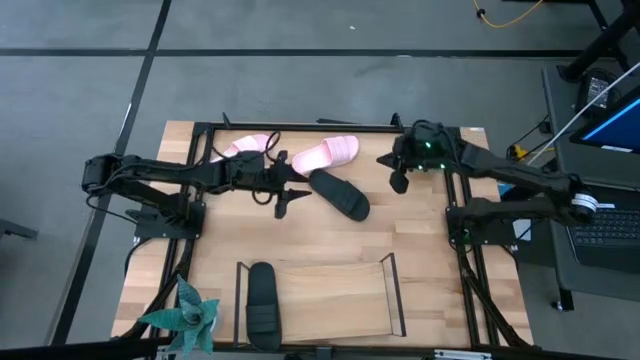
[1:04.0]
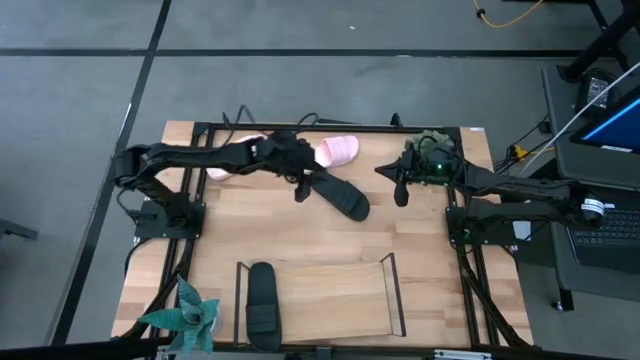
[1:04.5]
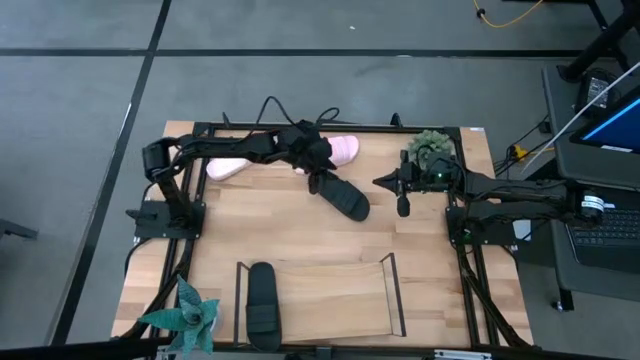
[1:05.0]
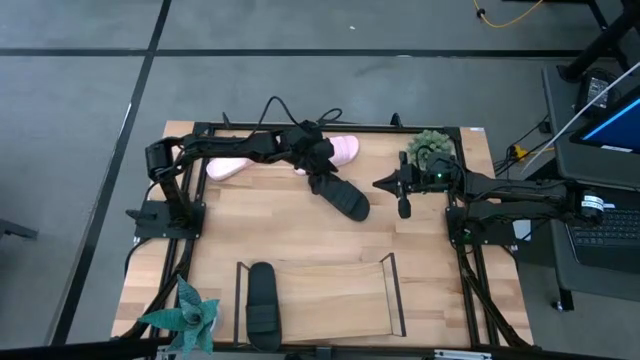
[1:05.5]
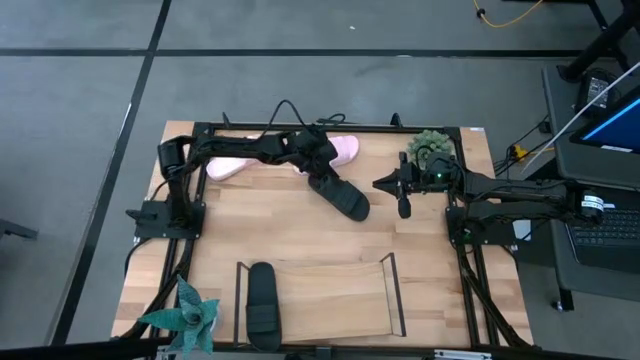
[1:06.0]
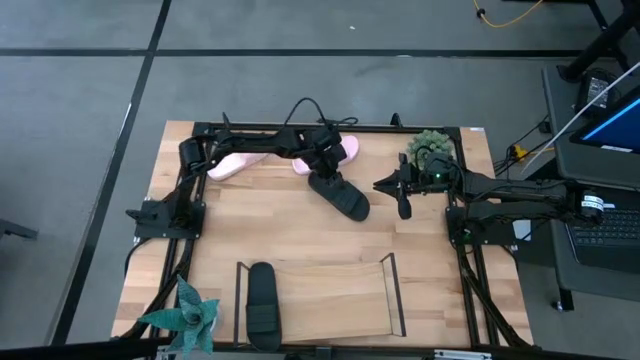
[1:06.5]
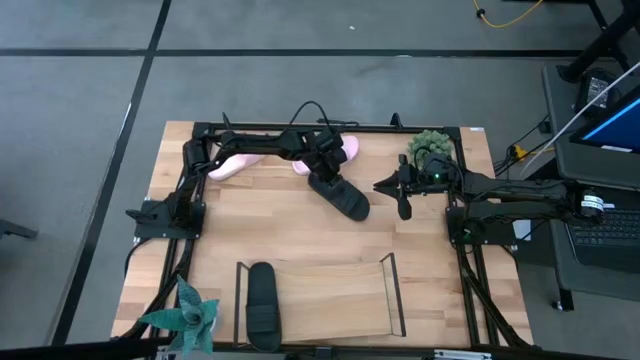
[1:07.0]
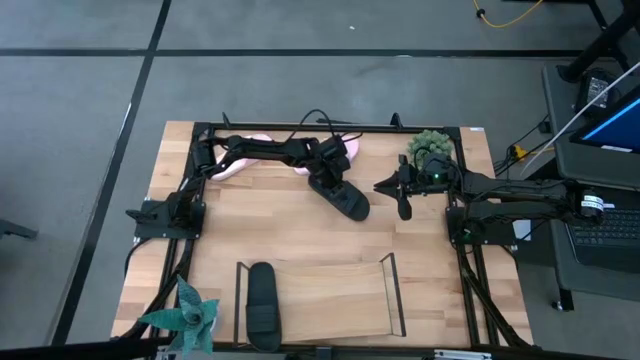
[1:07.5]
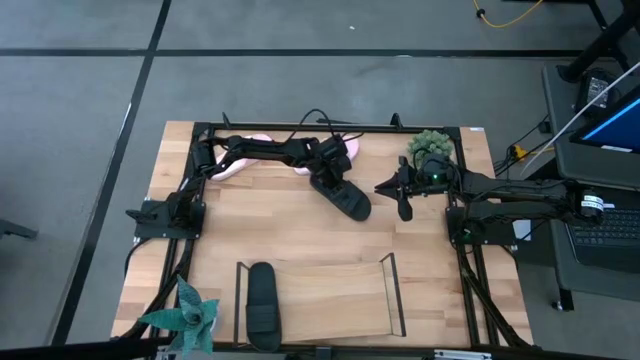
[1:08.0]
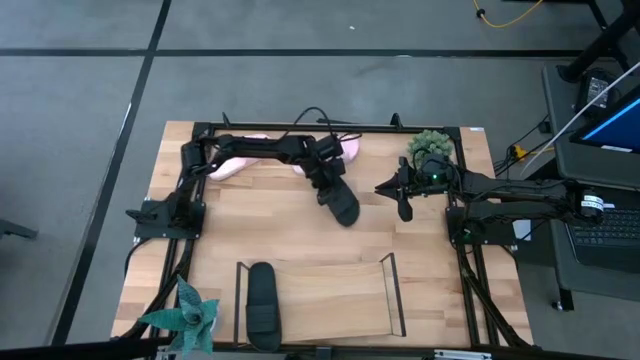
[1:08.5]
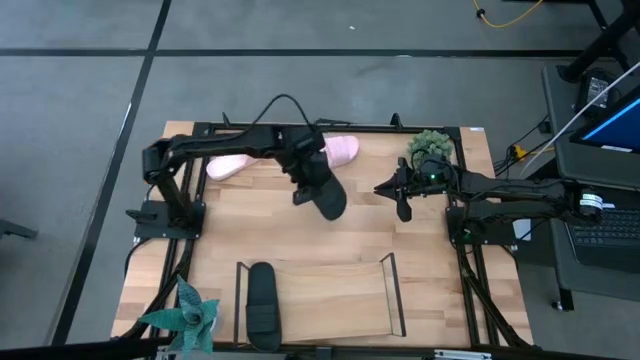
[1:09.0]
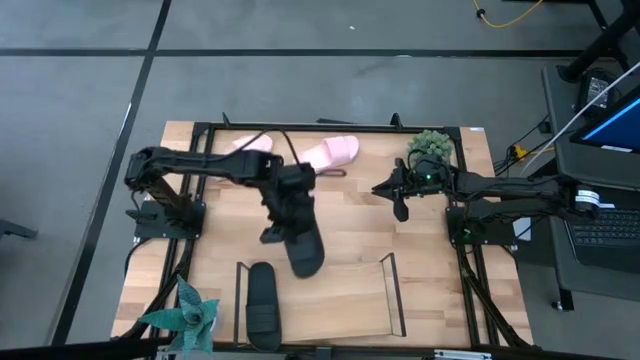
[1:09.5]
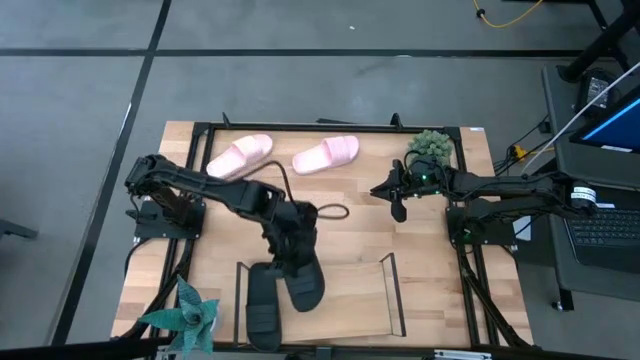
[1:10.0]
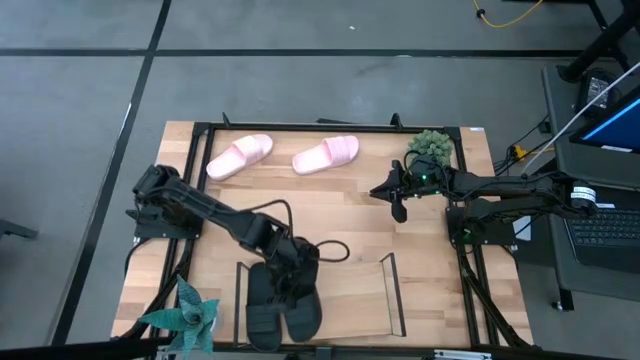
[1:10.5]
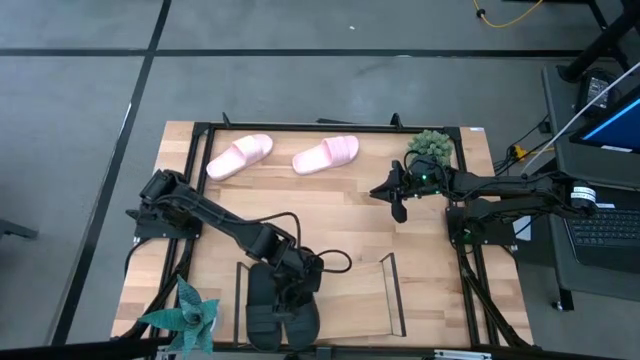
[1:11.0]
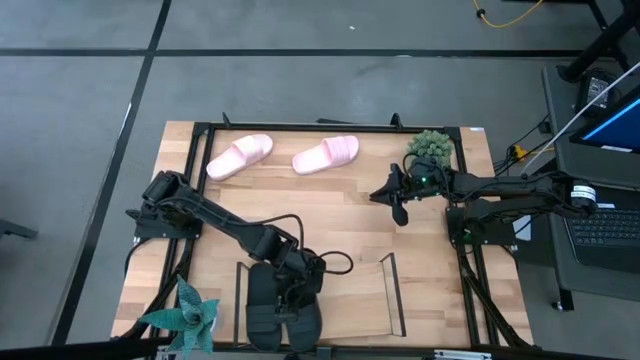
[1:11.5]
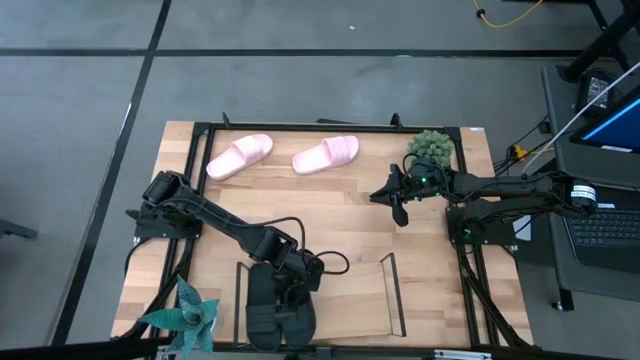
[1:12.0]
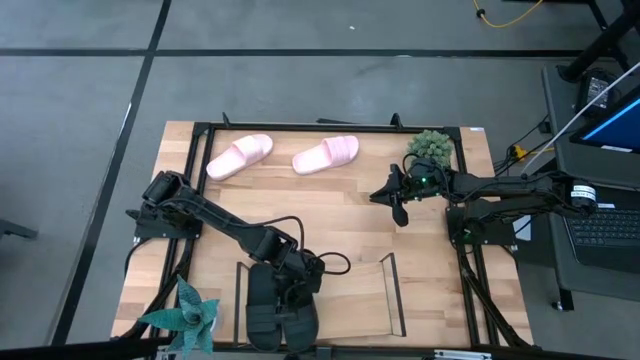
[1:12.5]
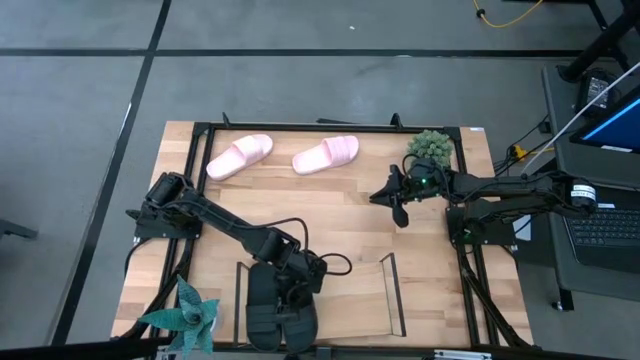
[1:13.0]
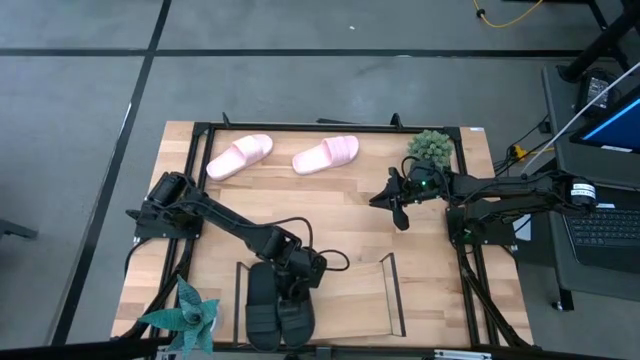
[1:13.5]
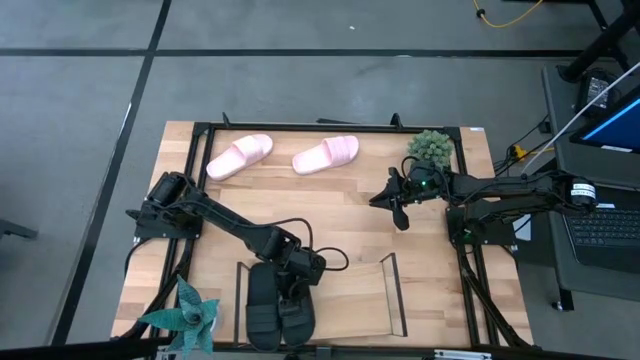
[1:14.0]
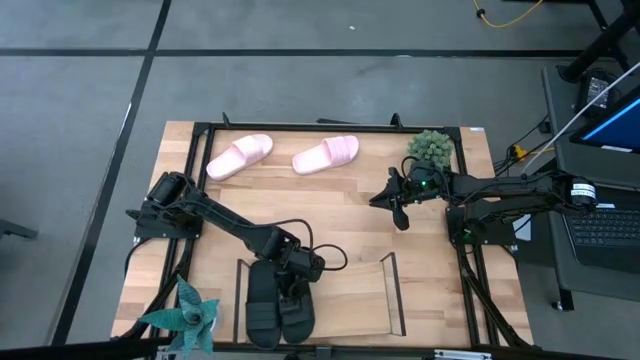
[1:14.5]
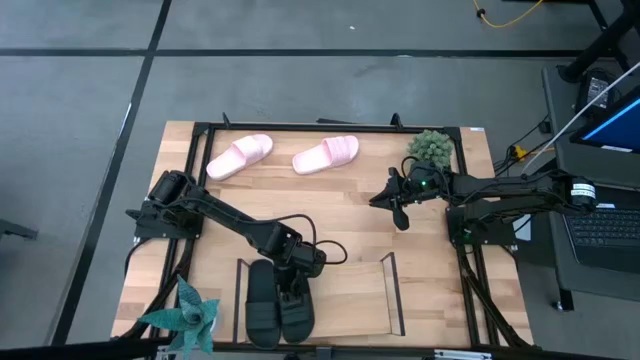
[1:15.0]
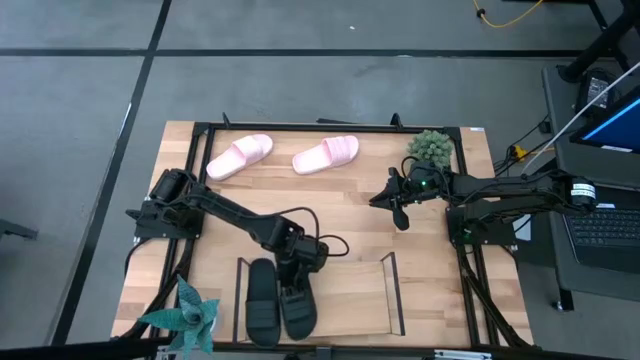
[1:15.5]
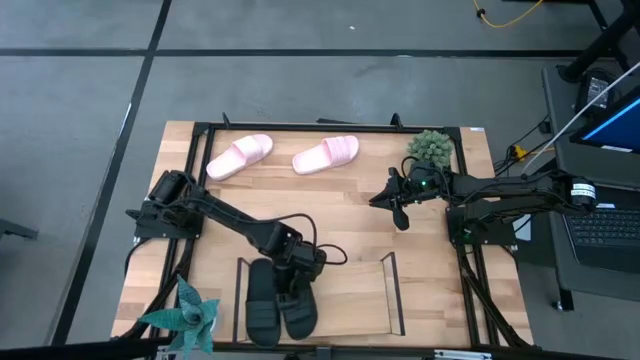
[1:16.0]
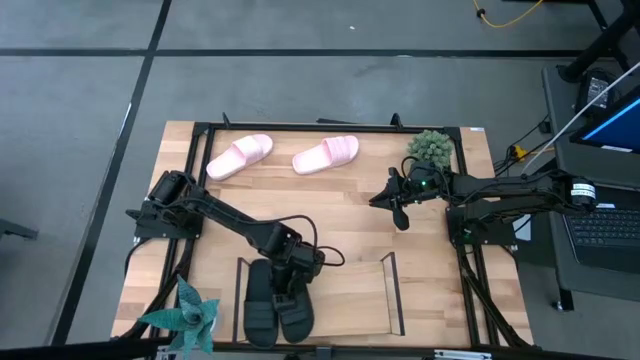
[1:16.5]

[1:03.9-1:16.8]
Task: Pick and place slides into the shelf
Put the black slide on the shelf

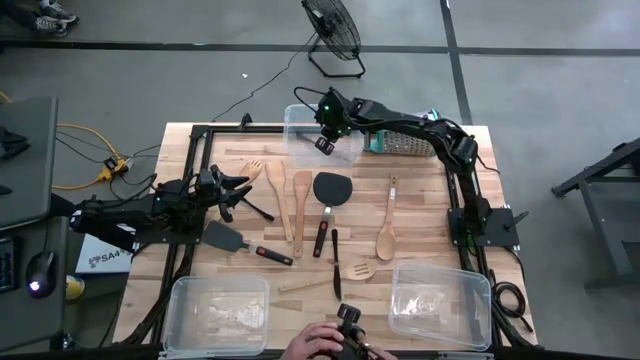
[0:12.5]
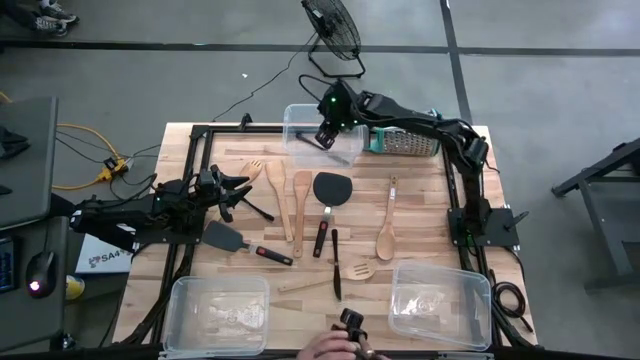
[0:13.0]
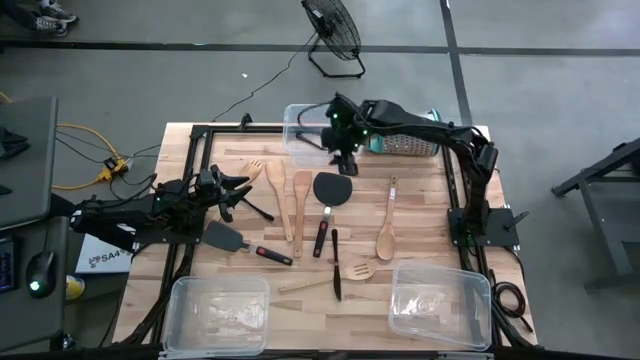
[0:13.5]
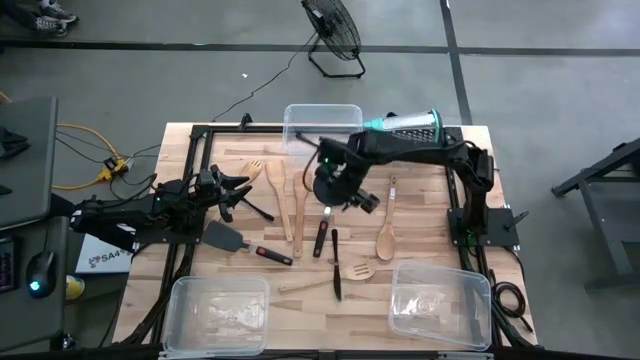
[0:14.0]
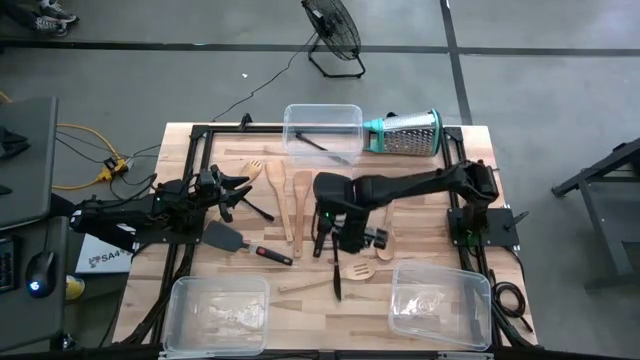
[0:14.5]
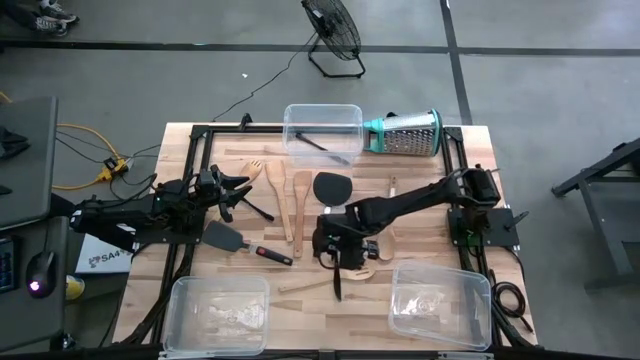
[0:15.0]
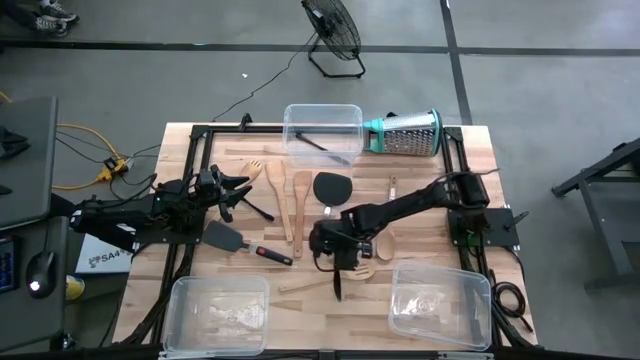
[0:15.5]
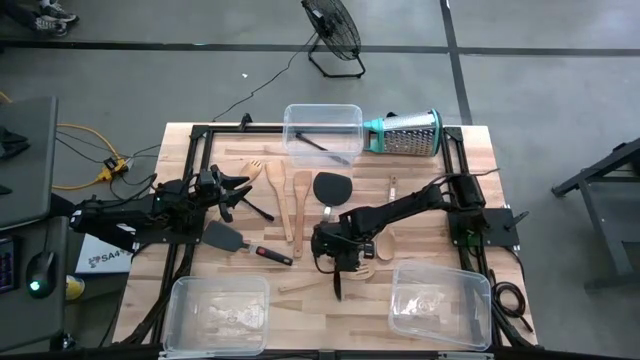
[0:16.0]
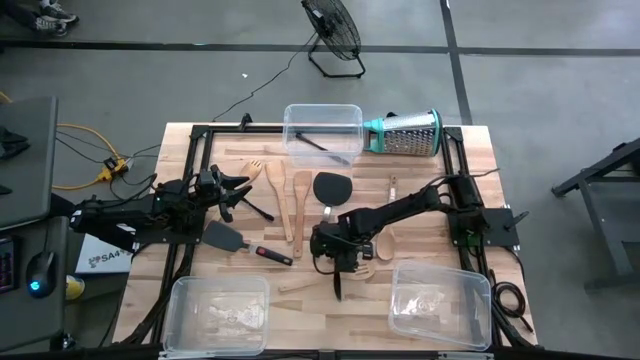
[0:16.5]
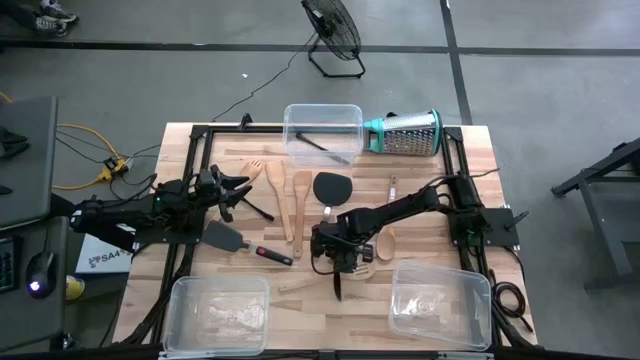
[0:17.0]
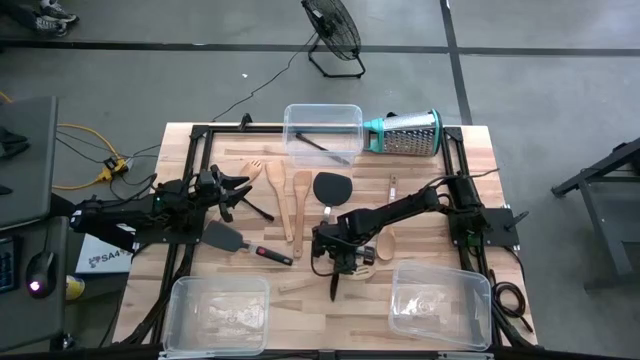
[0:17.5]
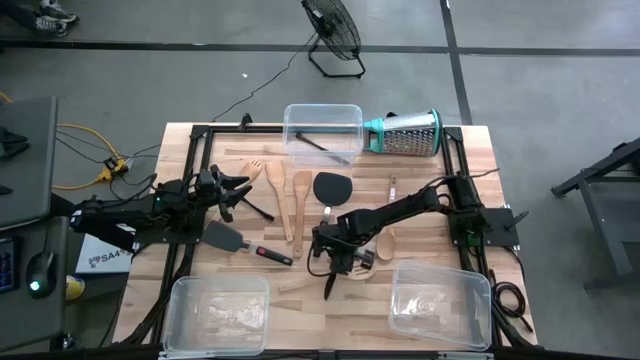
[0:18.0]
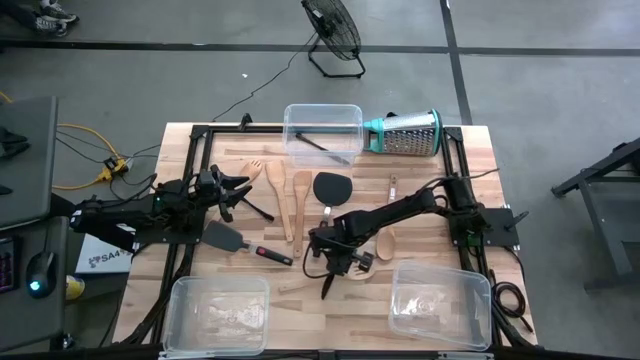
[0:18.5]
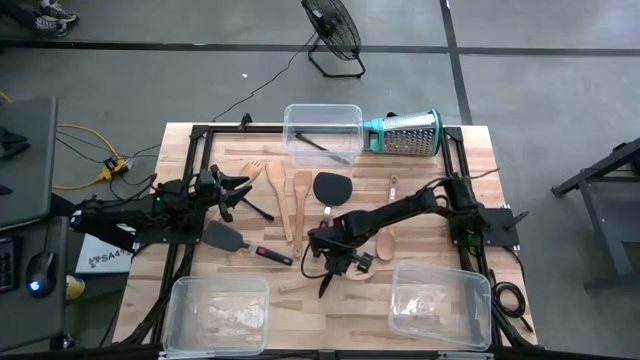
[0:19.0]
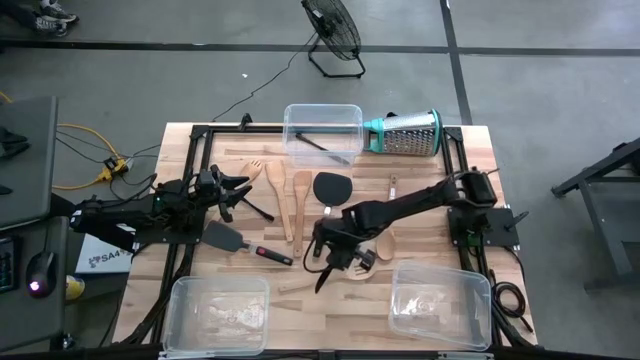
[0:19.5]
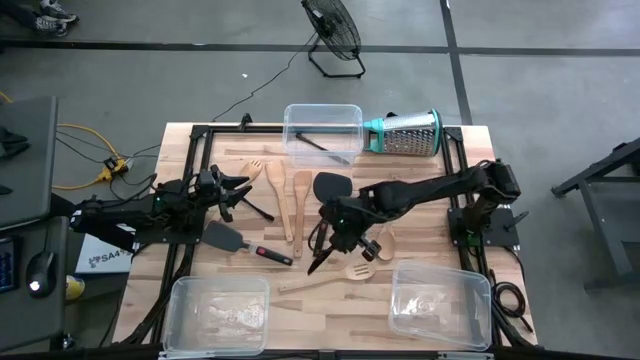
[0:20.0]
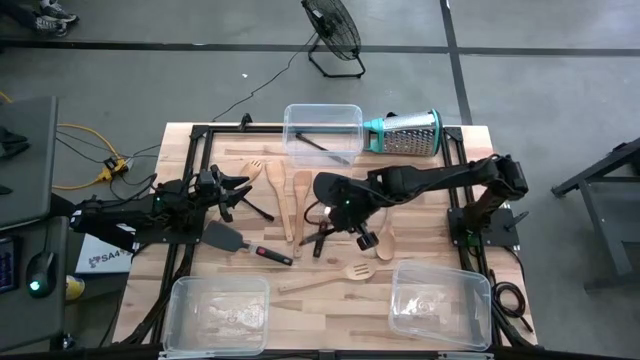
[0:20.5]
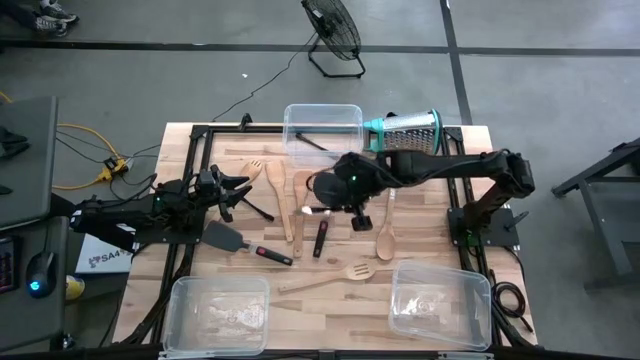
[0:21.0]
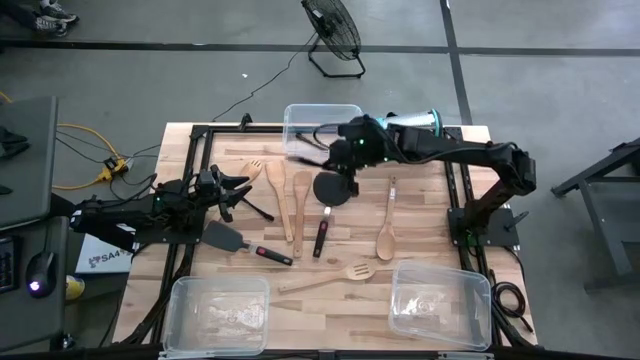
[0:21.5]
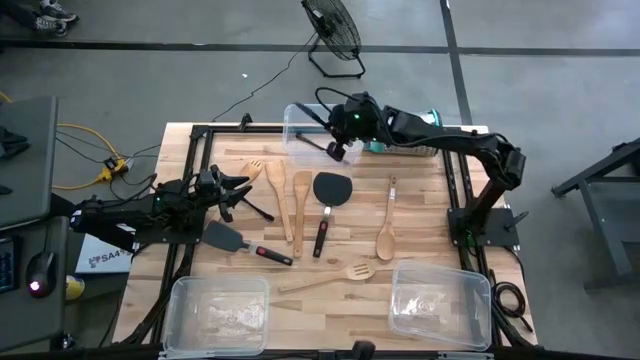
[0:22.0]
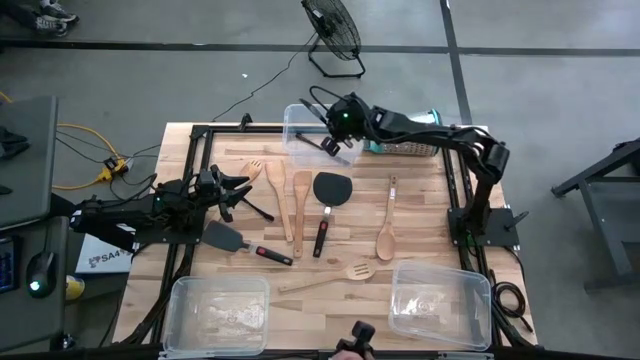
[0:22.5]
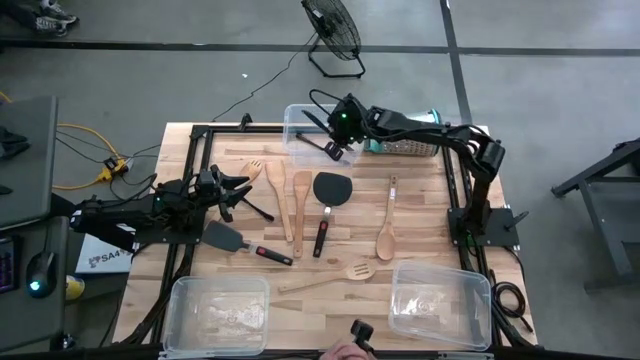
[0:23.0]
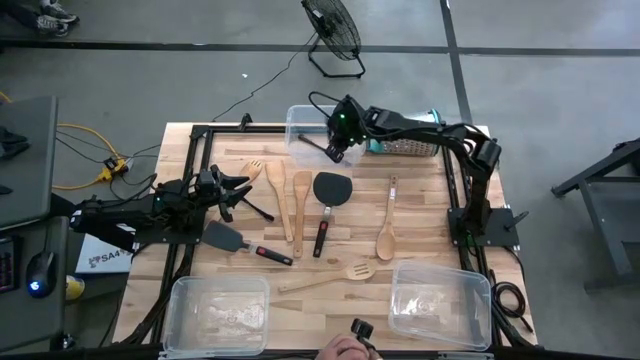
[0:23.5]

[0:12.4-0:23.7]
Task: Pick & Place Kitchen Items
Put the black table knife into the top transparent bin
